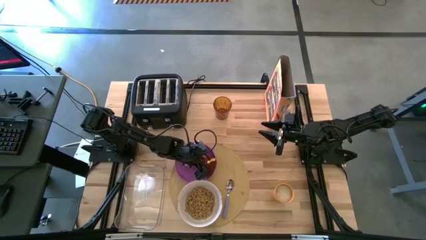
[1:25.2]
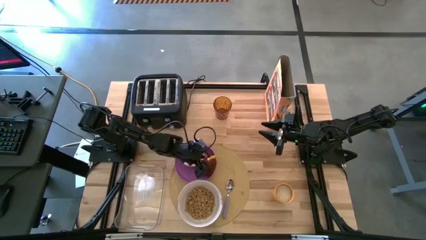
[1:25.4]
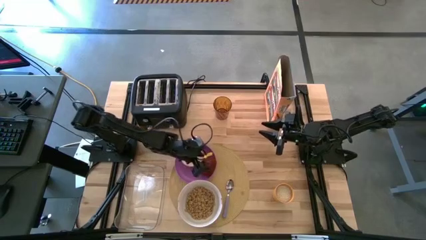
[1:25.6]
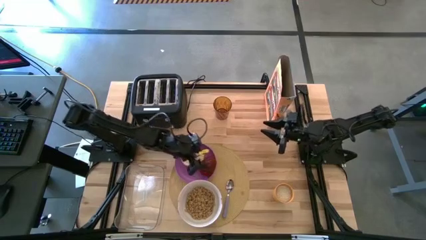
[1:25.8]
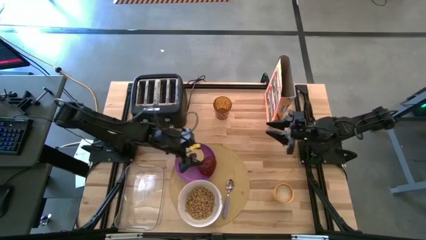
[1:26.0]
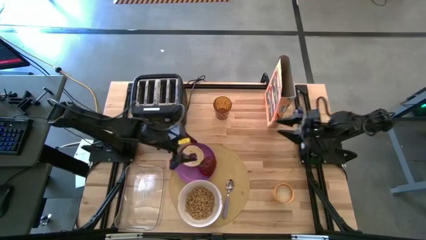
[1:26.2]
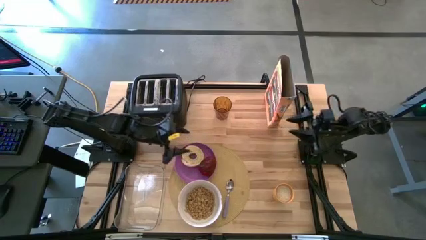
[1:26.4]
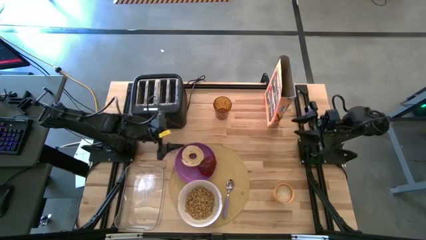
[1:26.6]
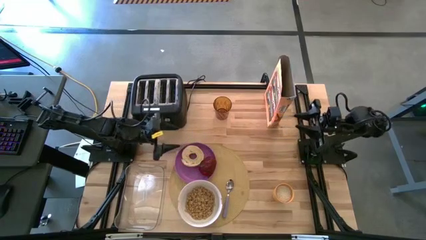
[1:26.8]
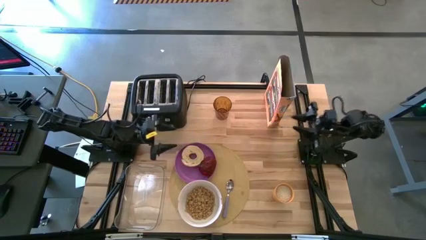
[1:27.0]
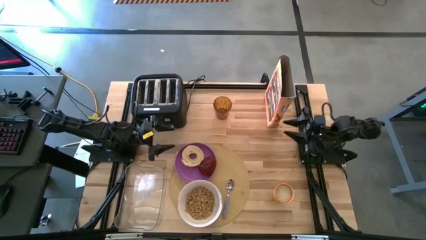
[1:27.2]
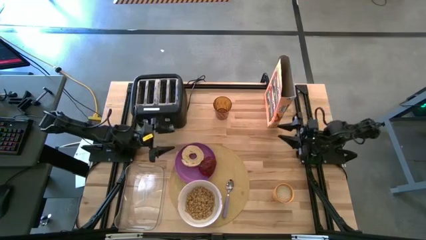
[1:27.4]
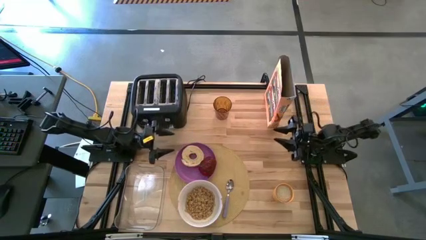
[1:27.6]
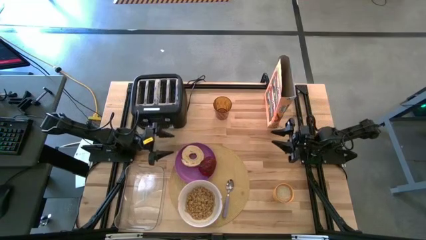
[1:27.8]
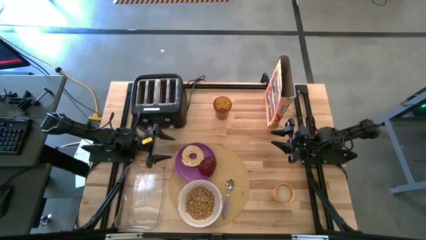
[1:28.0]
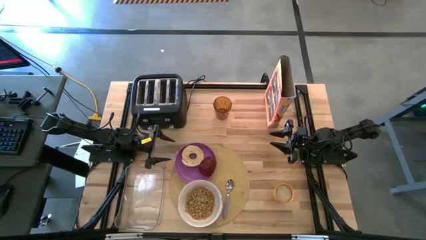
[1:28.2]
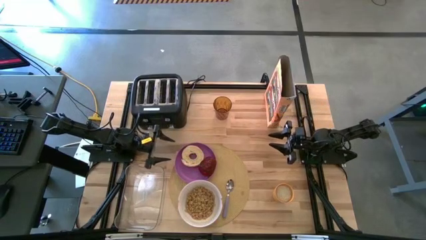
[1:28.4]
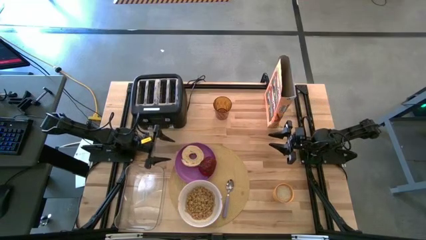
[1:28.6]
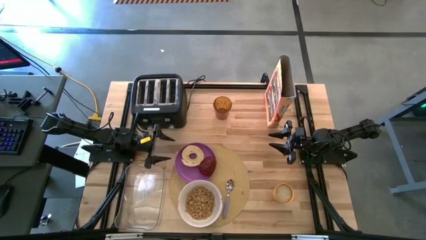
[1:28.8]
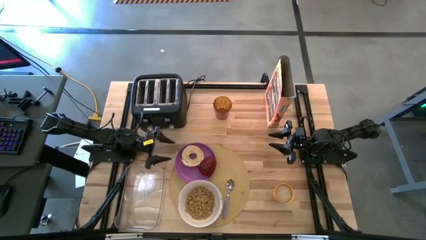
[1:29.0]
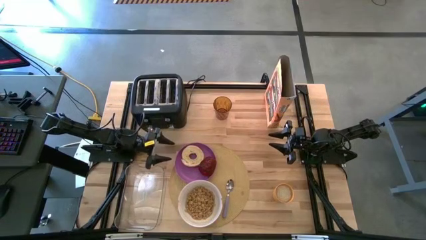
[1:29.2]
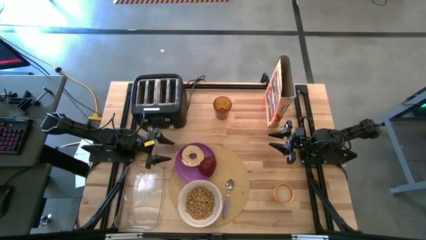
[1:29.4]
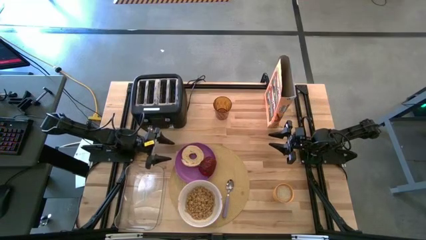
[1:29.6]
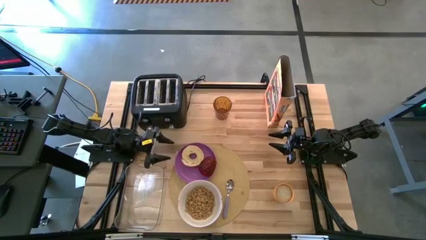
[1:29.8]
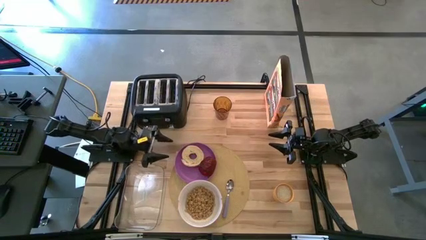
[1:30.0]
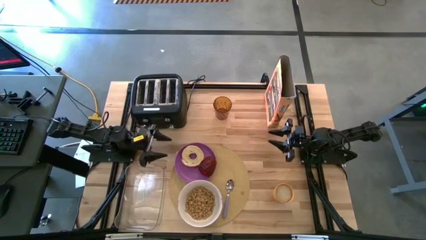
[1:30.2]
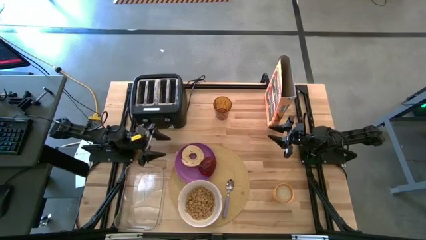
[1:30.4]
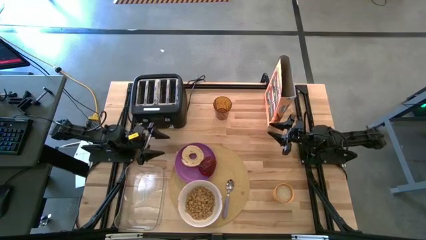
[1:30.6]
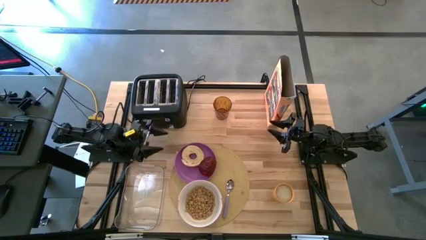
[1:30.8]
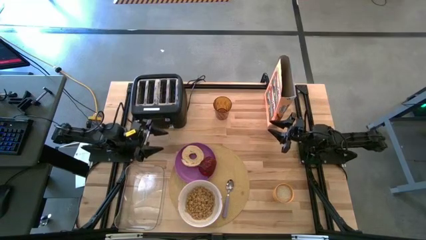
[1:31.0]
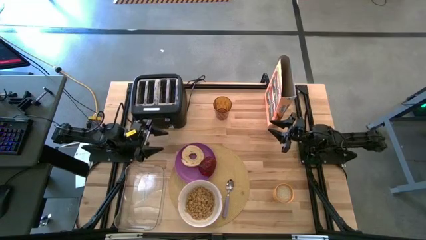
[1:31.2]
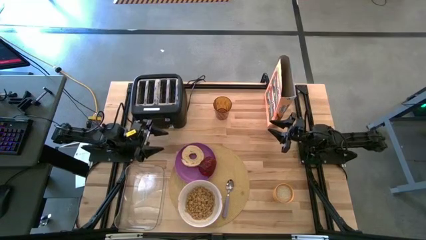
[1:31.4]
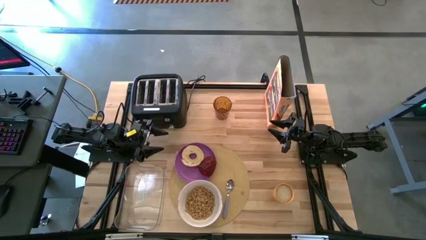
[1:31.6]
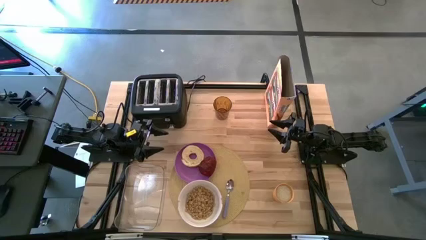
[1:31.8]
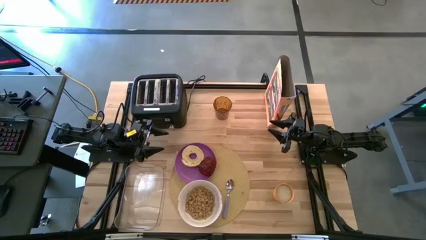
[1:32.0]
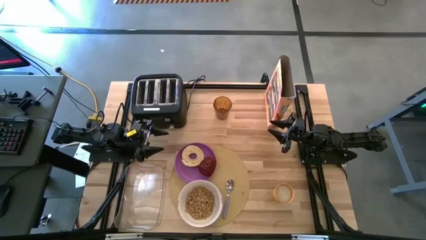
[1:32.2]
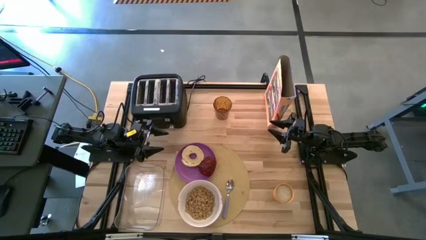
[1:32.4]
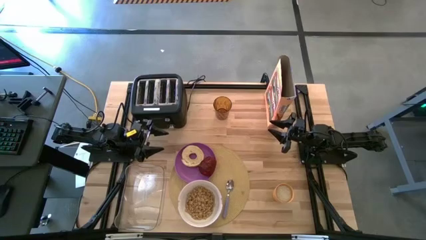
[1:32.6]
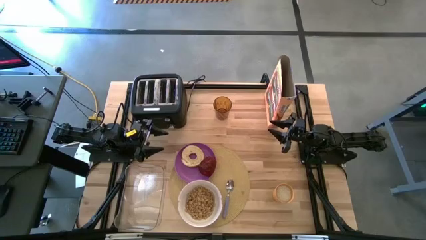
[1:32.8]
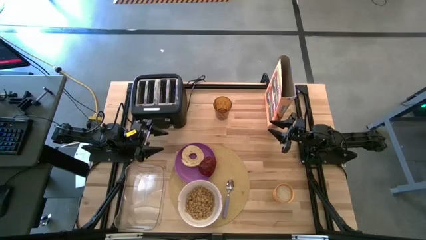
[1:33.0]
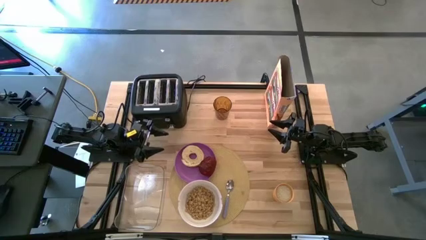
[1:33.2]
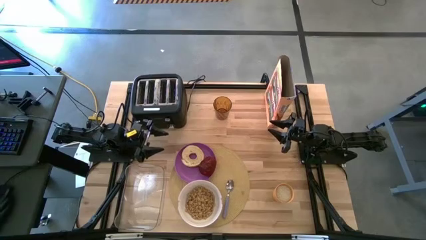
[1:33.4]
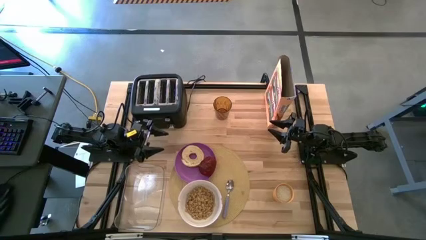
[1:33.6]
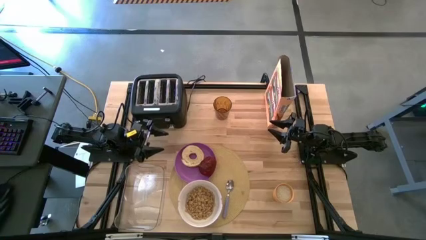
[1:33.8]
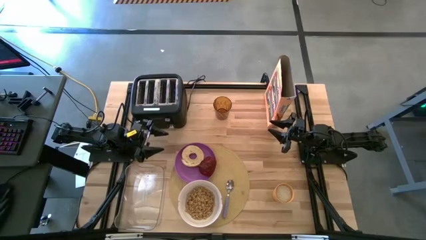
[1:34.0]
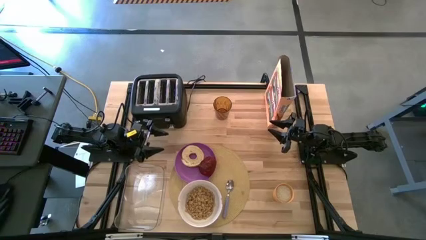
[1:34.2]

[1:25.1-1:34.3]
Task: Arrange a breakfast setting
Return to home position

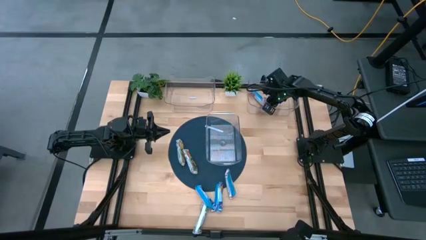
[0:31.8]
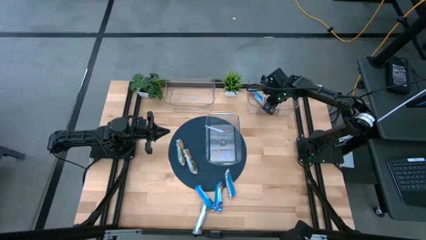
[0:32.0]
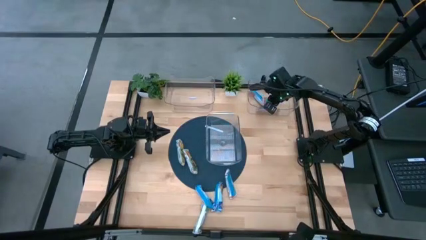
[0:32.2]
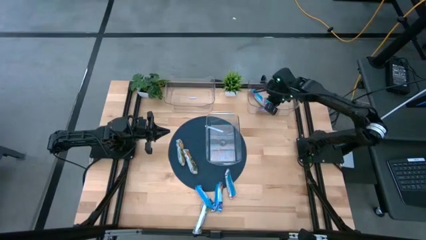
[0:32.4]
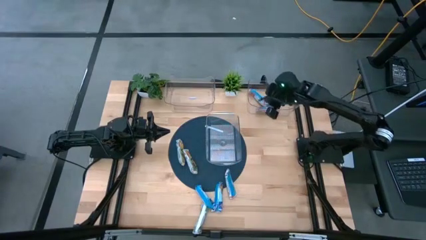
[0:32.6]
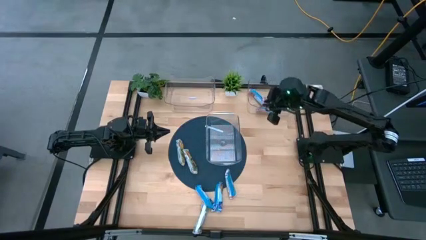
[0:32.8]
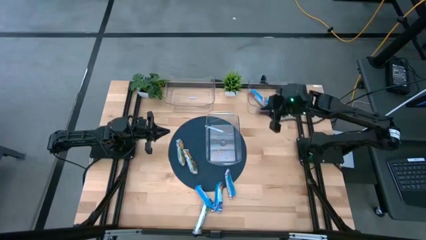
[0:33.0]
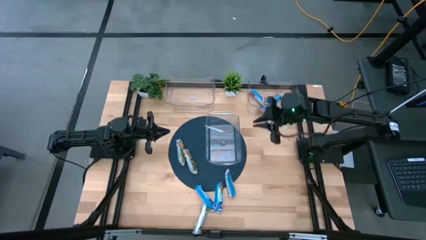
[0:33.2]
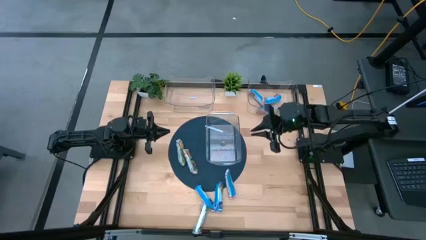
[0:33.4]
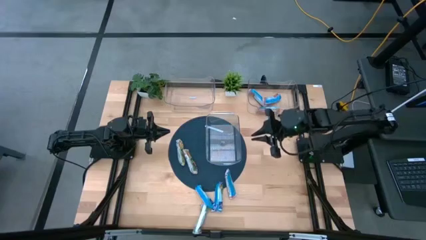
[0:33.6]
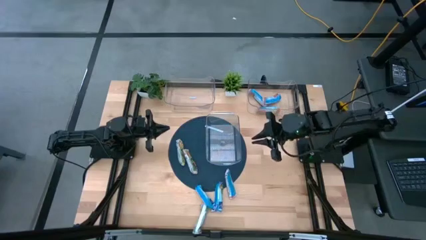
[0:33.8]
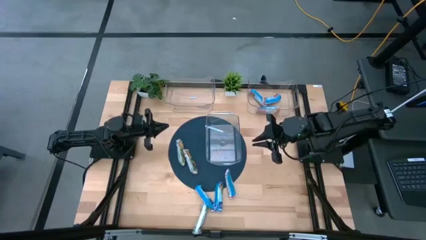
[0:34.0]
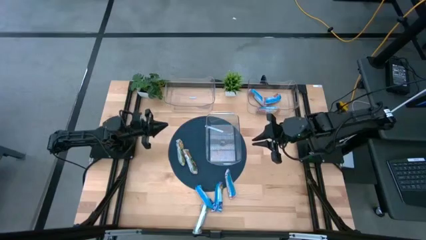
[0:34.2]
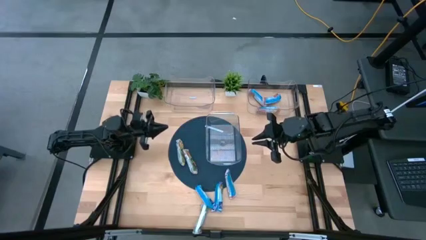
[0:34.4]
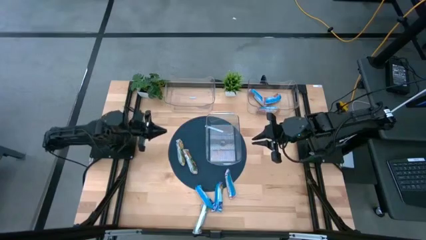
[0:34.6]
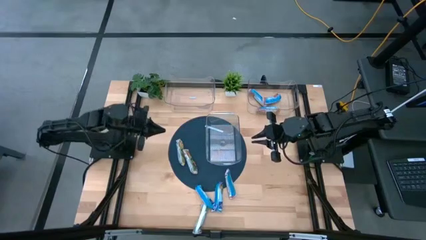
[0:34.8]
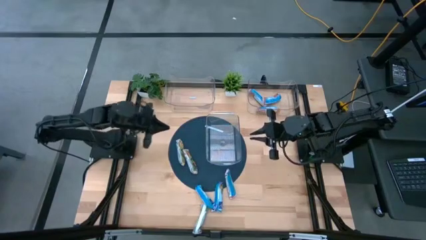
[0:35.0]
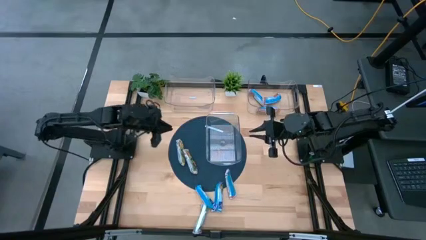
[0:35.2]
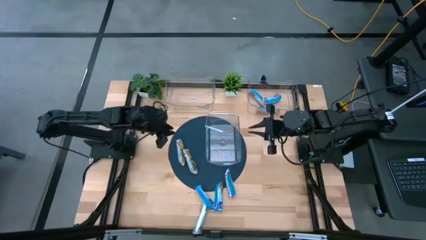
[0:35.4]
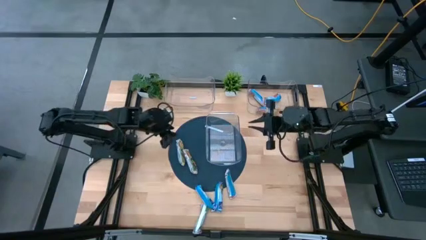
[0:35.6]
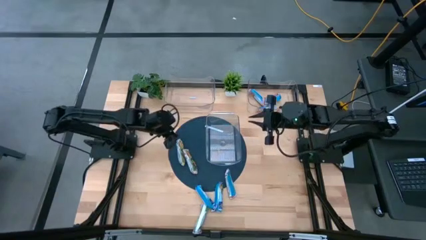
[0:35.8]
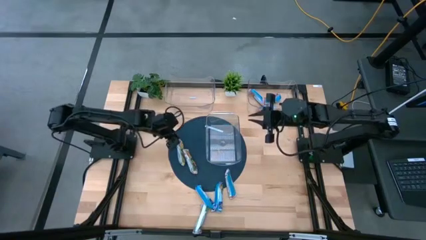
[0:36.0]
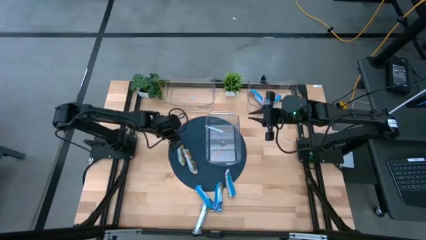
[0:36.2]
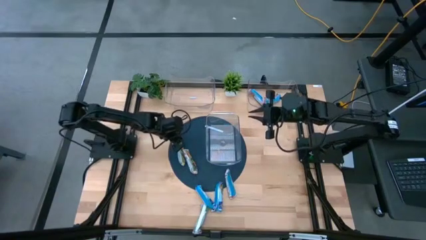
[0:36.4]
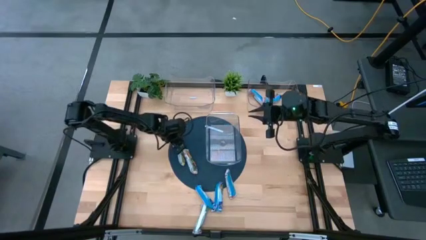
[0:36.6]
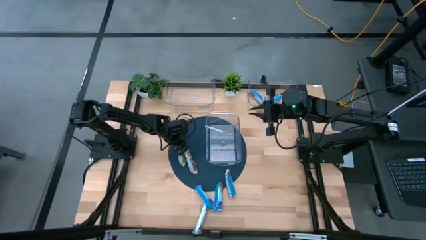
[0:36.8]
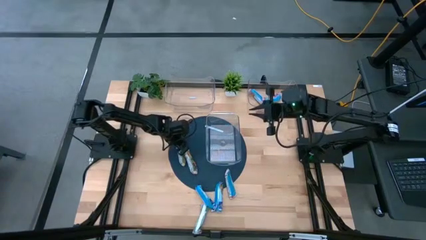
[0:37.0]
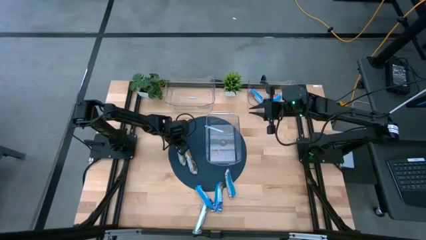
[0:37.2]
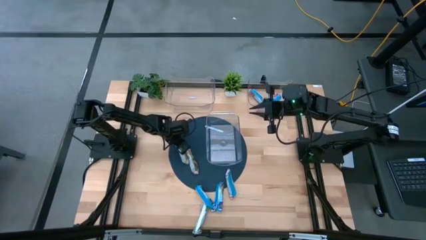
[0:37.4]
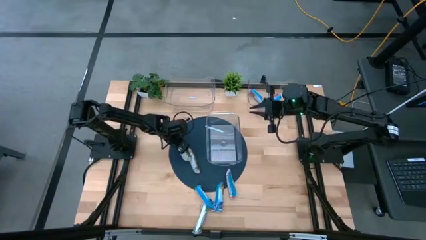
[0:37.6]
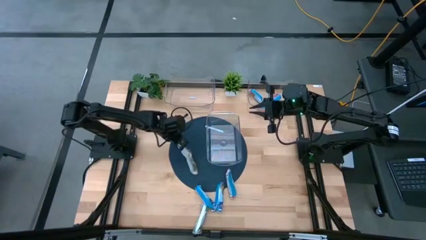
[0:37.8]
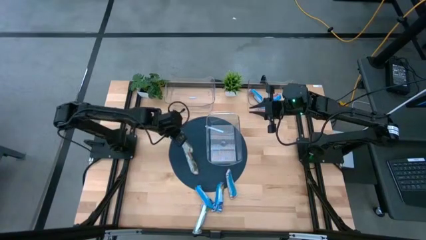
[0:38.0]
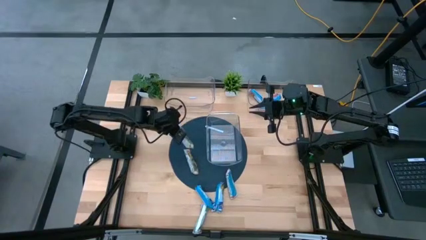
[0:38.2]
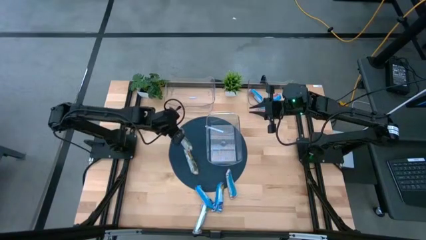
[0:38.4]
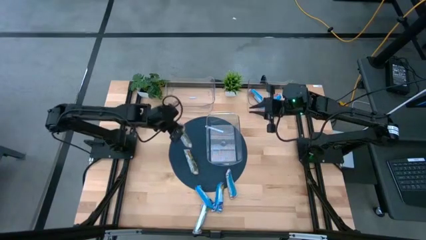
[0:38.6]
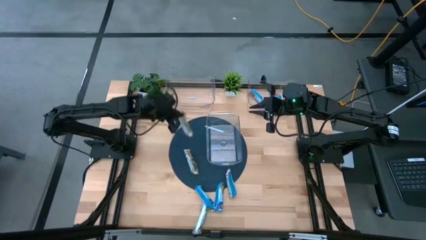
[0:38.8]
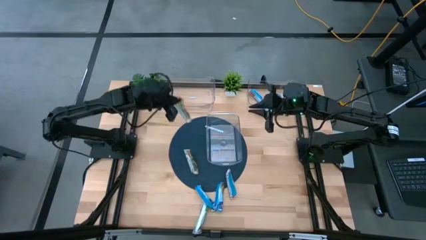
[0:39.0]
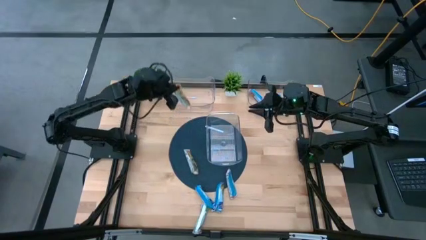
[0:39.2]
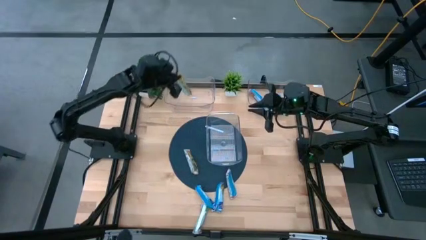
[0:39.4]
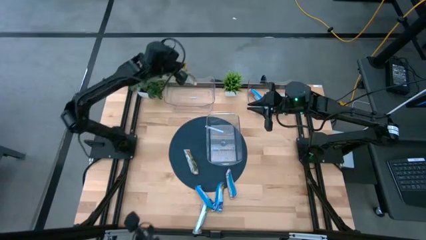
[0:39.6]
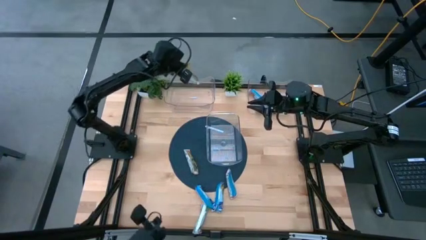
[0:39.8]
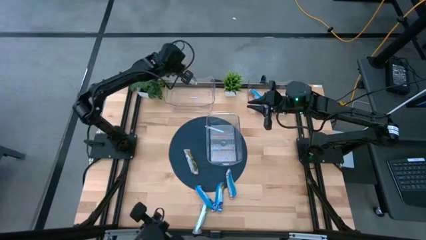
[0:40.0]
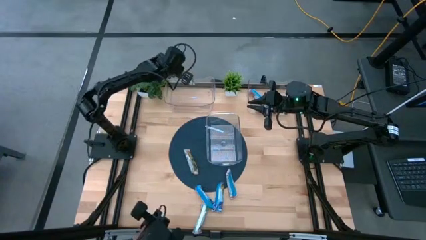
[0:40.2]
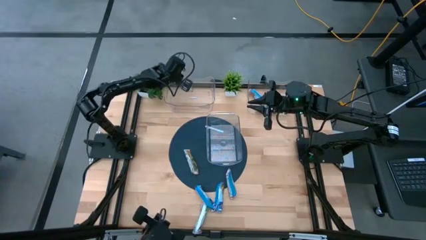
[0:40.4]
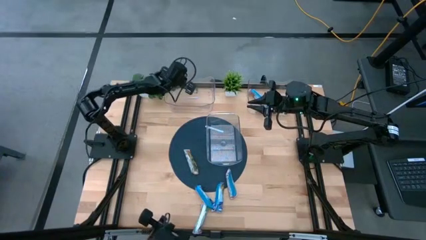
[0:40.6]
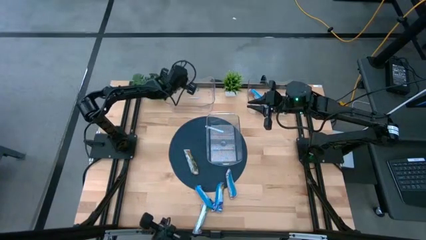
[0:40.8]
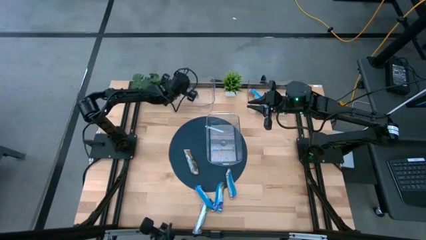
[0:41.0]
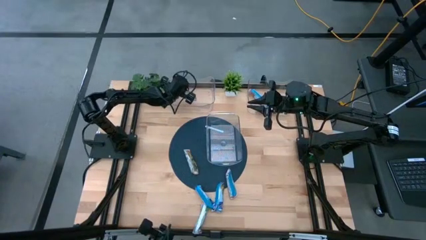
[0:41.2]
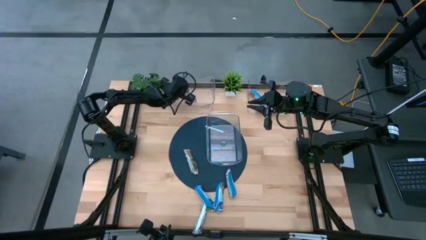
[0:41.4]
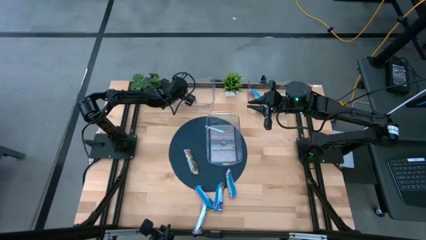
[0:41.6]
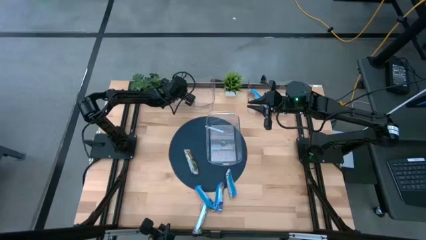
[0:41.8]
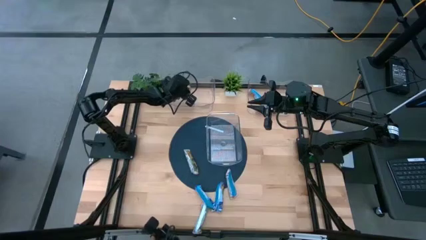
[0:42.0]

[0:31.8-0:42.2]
Task: Pick and place Granola Bars by type
Put the yellow granola bar into the top left transparent bin
